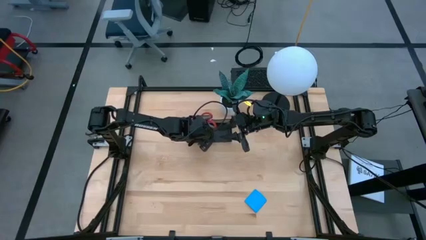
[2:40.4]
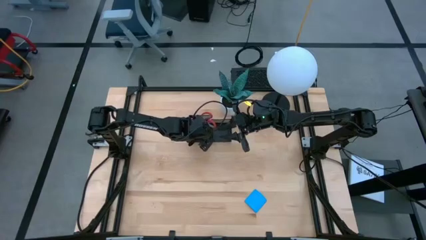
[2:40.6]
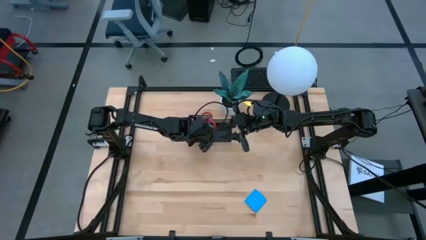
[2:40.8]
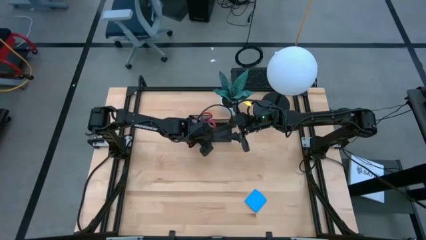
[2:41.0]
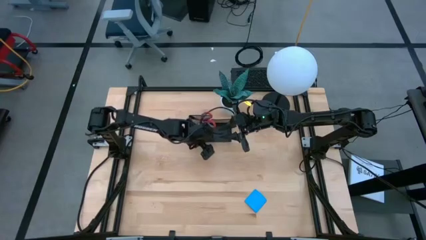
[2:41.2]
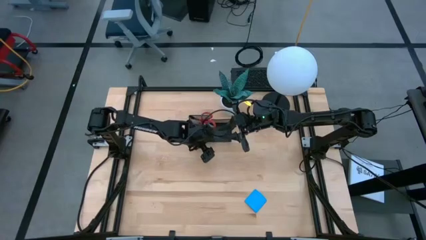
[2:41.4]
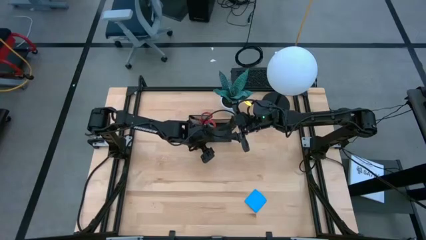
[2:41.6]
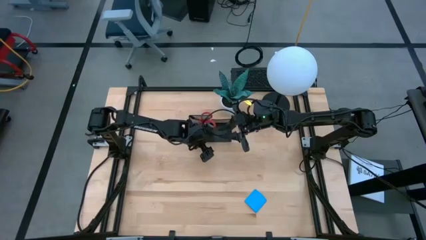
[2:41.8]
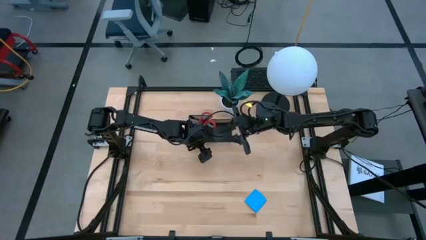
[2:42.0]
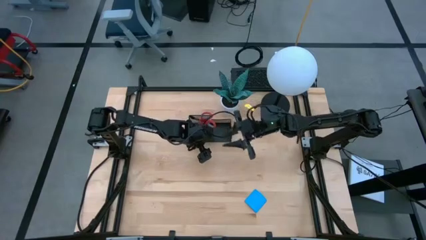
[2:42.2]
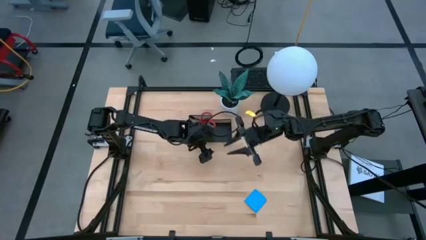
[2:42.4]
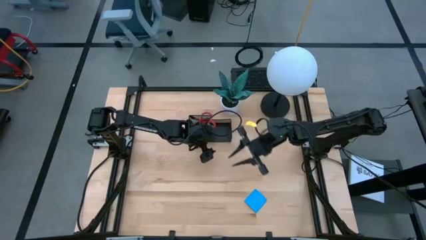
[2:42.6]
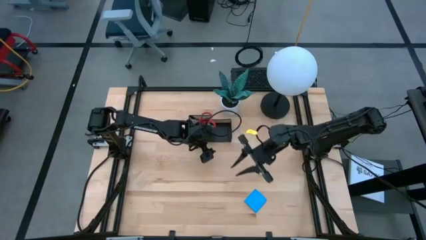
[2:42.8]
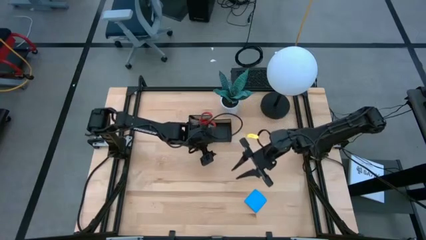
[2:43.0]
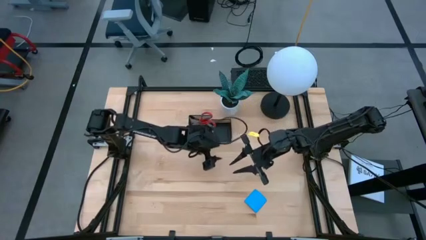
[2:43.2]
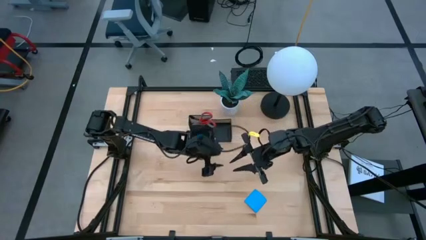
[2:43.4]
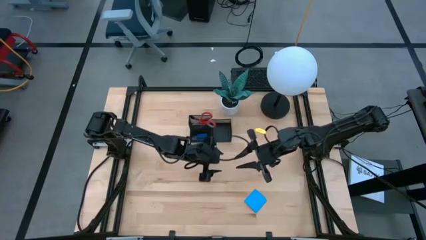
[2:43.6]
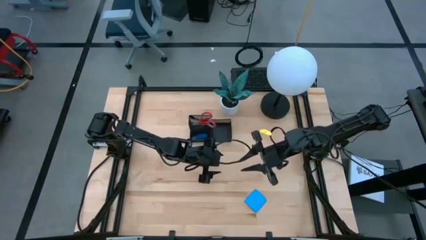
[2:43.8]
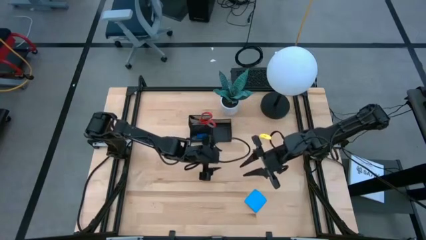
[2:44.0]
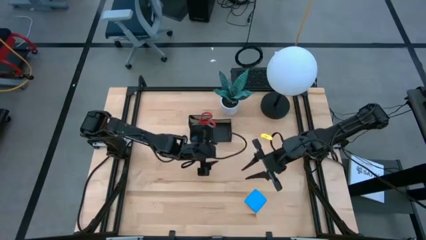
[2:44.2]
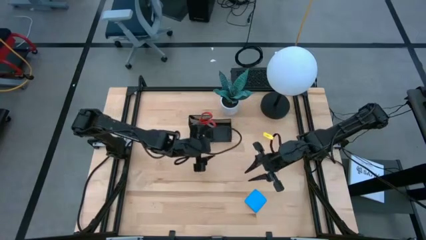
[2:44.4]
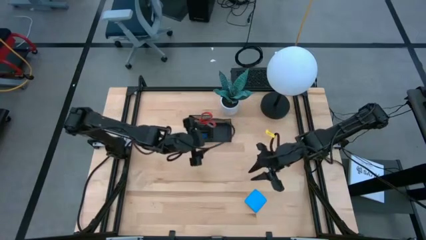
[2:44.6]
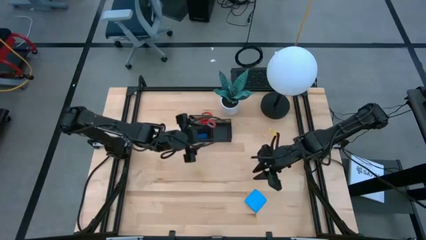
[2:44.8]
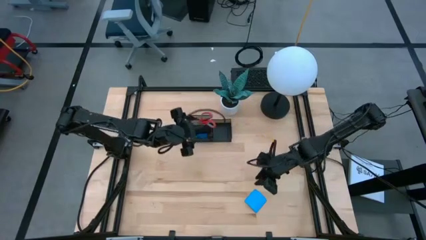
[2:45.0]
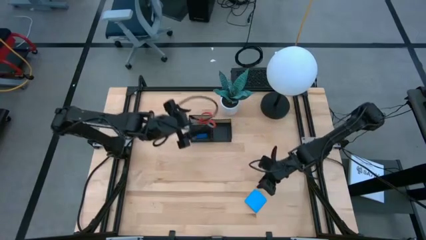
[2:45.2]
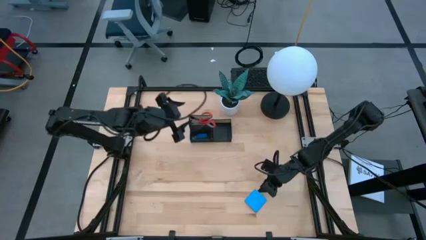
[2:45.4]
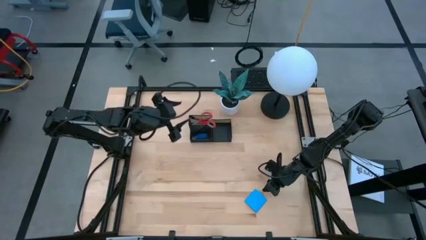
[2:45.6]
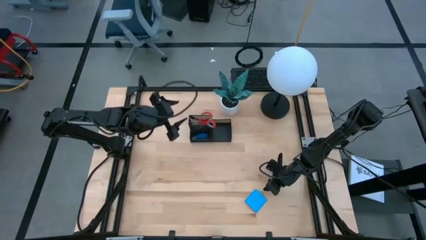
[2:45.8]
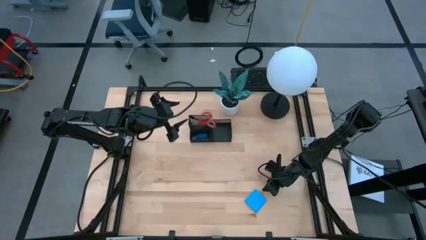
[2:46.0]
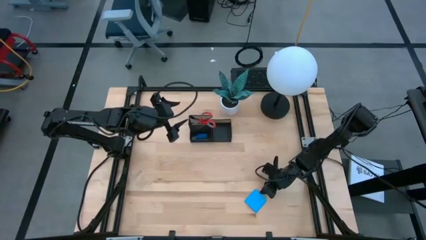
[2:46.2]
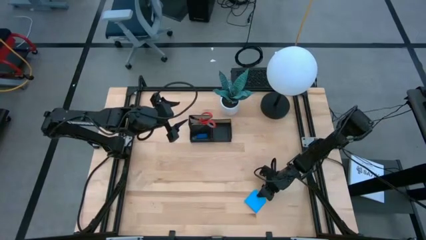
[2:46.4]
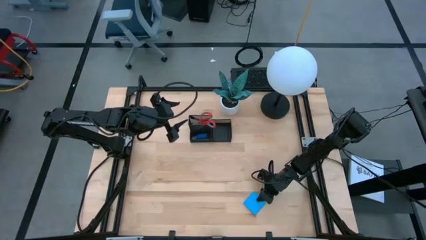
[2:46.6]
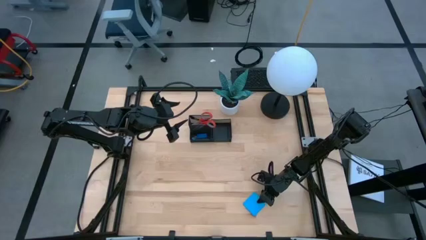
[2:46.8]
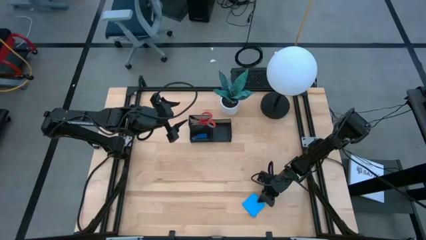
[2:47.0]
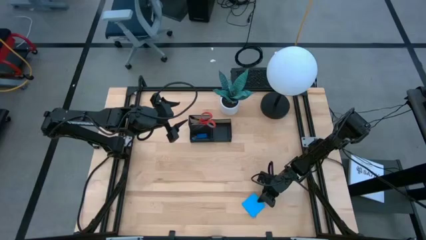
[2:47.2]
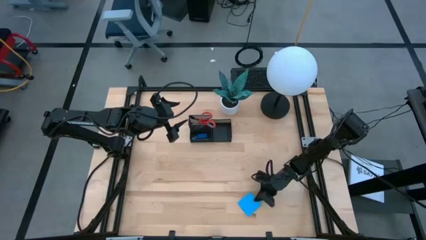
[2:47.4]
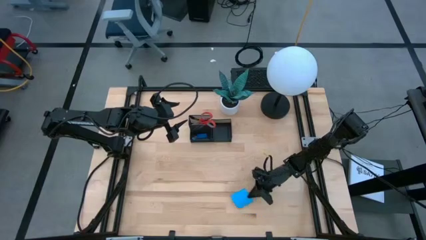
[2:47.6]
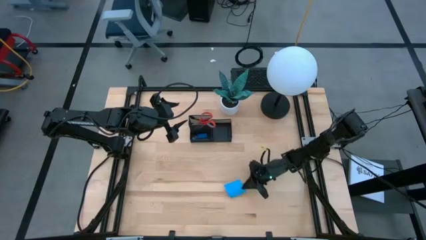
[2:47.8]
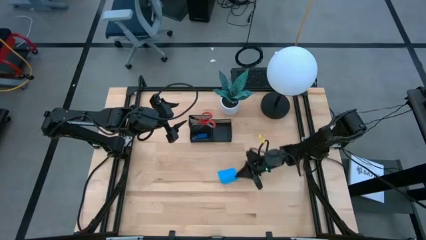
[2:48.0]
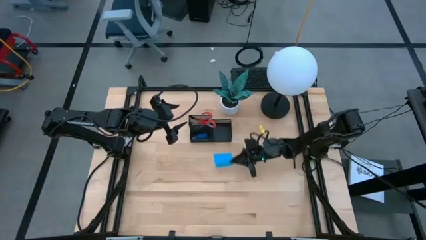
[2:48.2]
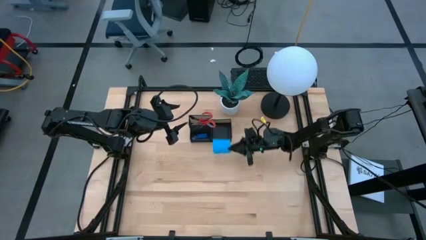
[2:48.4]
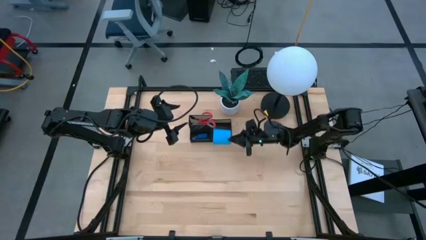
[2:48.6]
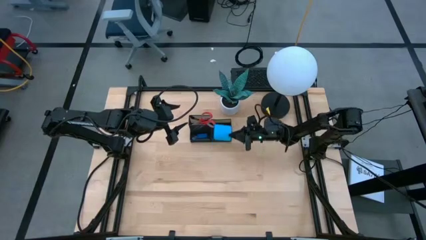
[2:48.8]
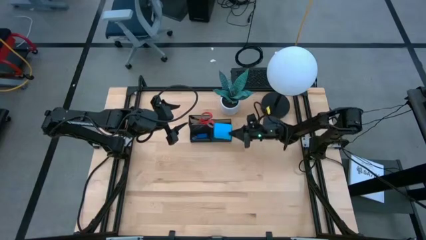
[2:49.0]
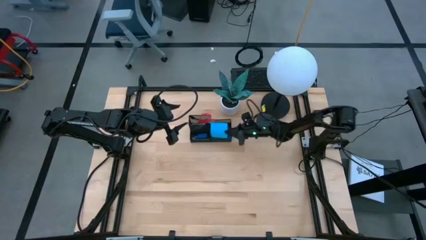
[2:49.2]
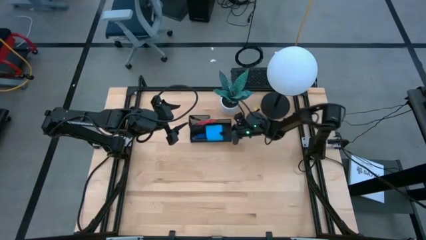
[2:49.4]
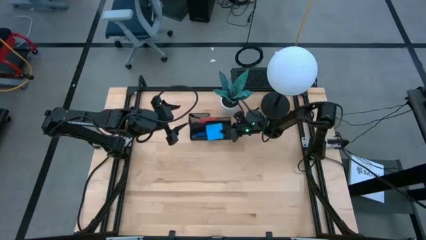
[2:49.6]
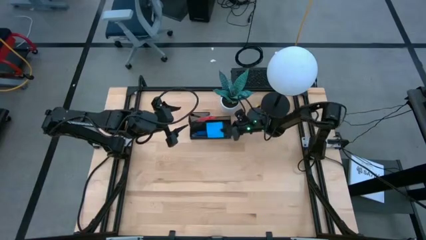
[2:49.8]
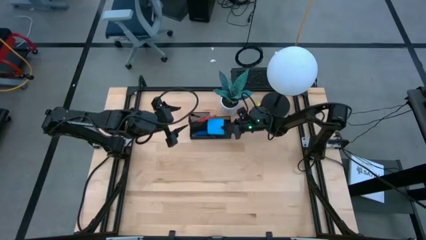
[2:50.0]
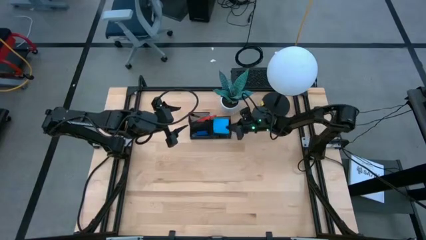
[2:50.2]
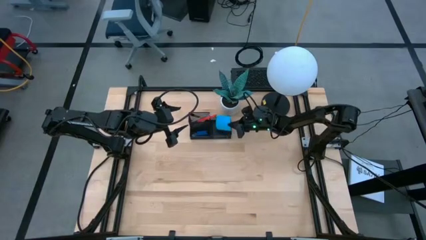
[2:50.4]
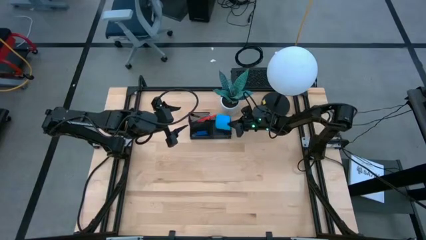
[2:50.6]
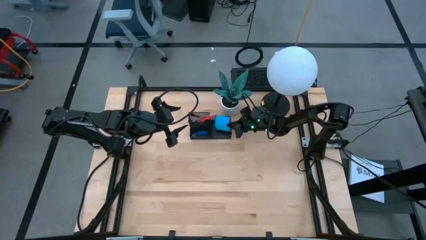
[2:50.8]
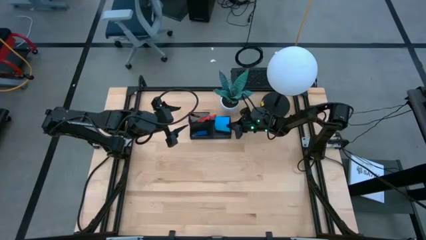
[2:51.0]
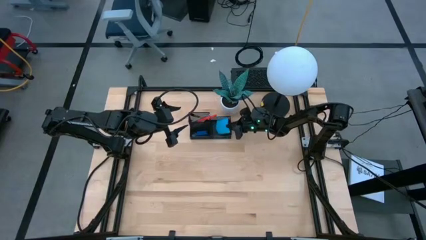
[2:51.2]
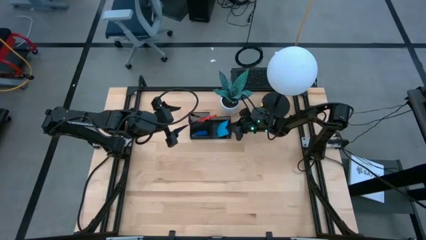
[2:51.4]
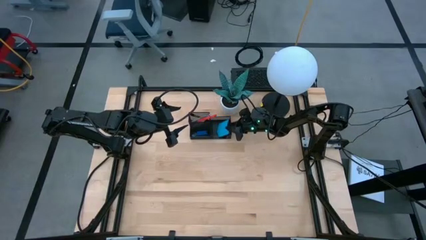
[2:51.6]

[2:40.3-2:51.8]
Task: Pick and place office supplies into organizer
Put the blue sticky notes into the black desk organizer
